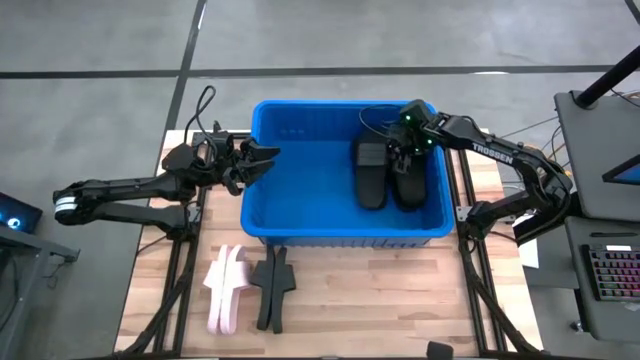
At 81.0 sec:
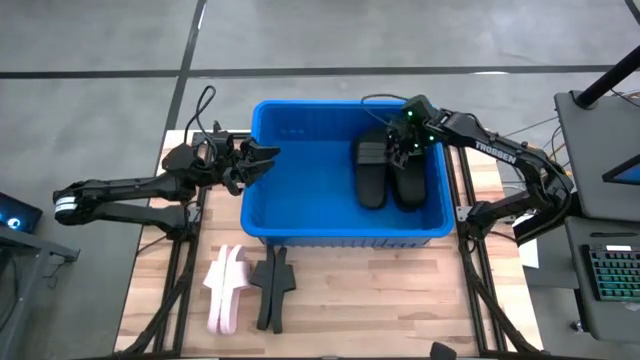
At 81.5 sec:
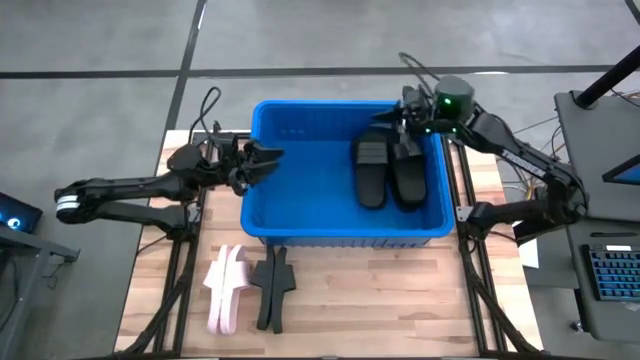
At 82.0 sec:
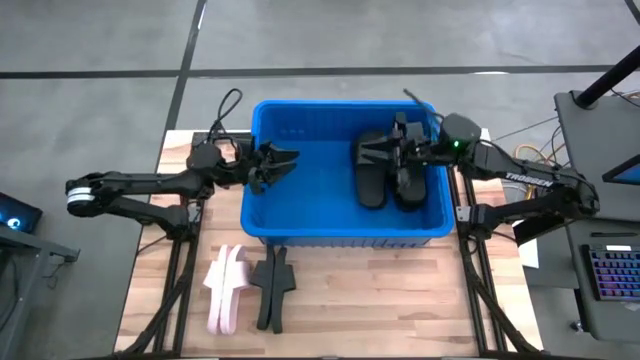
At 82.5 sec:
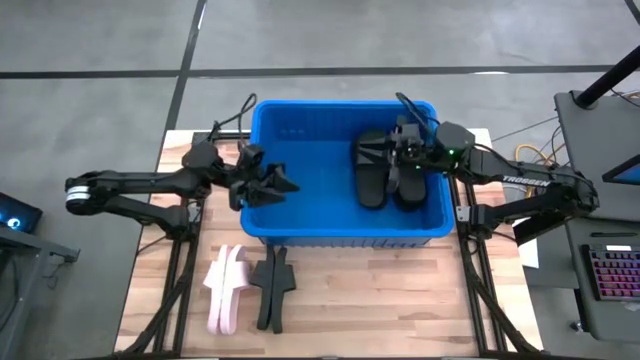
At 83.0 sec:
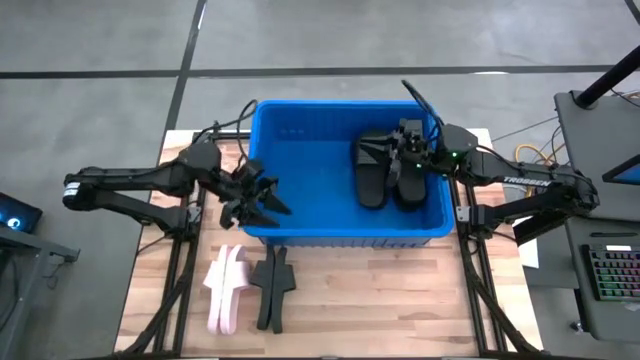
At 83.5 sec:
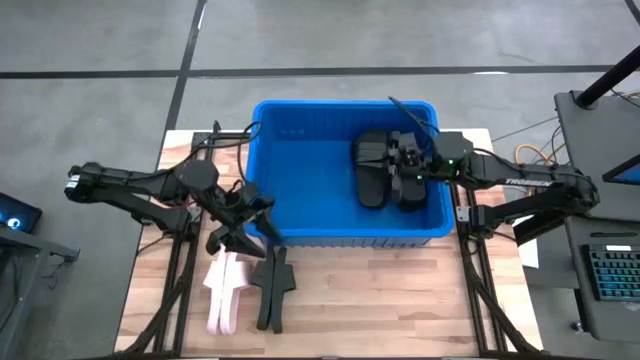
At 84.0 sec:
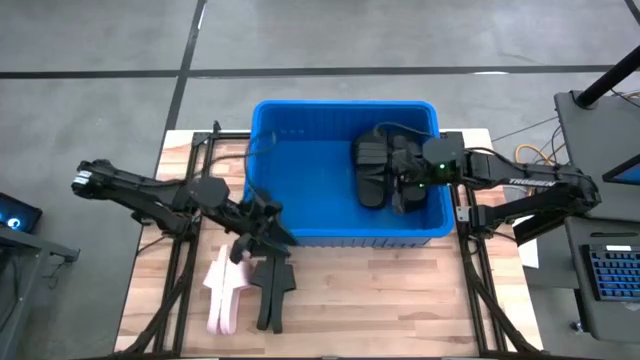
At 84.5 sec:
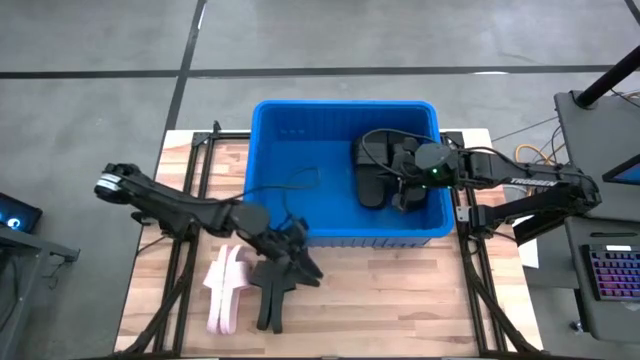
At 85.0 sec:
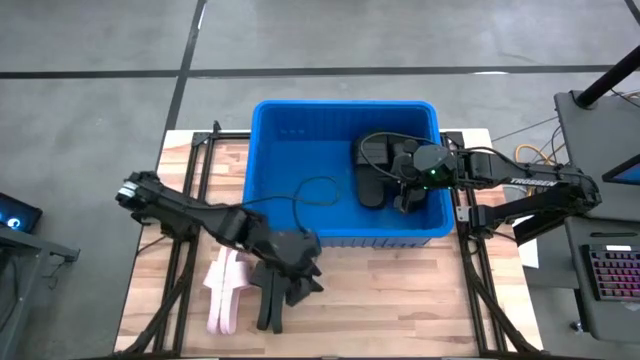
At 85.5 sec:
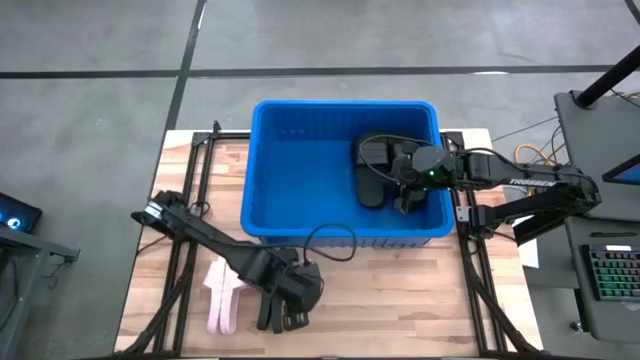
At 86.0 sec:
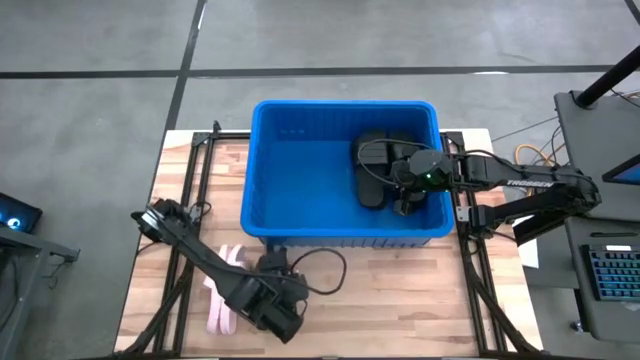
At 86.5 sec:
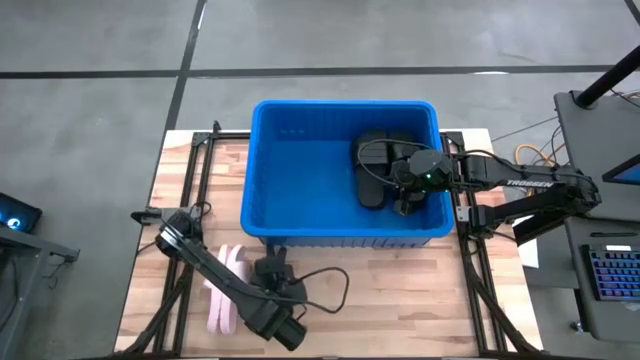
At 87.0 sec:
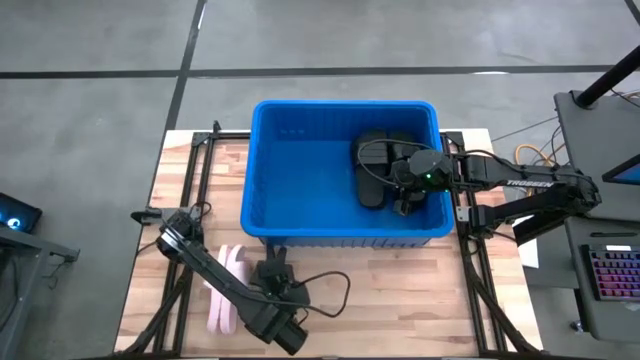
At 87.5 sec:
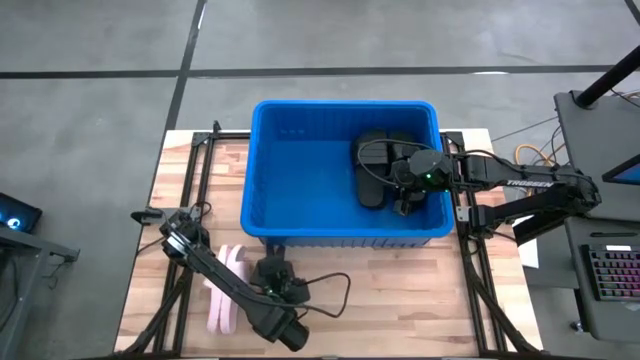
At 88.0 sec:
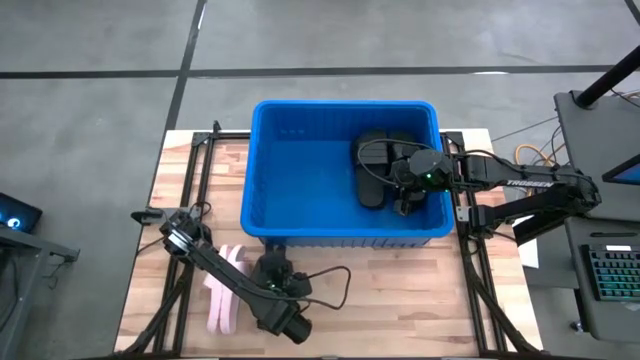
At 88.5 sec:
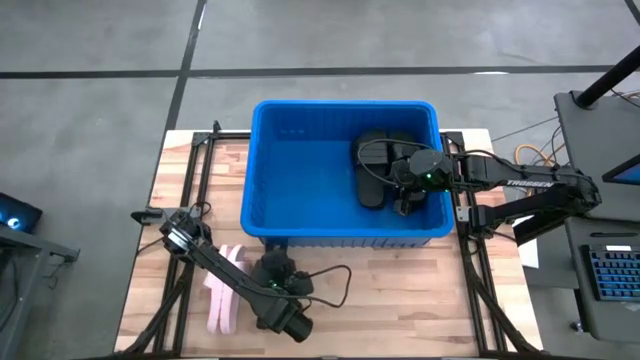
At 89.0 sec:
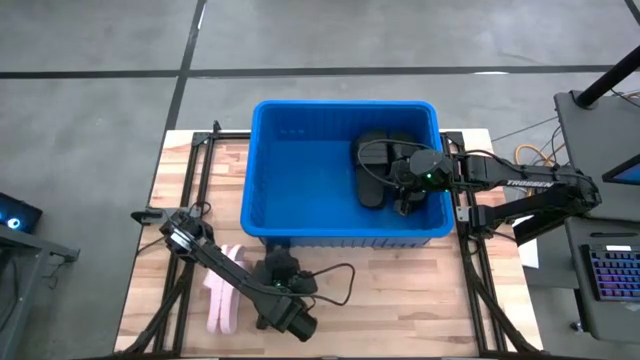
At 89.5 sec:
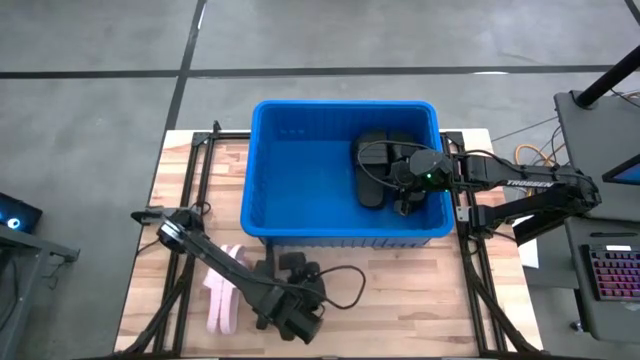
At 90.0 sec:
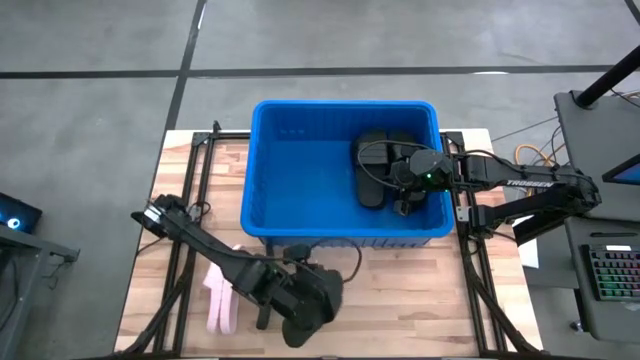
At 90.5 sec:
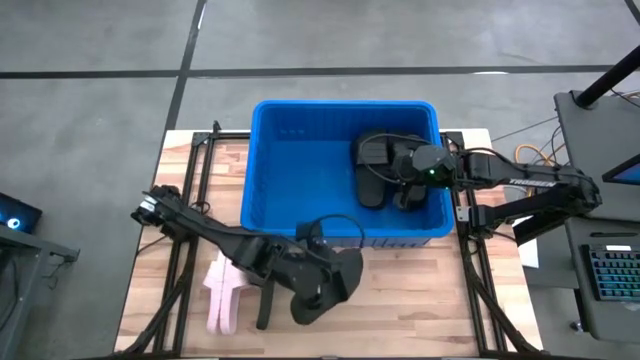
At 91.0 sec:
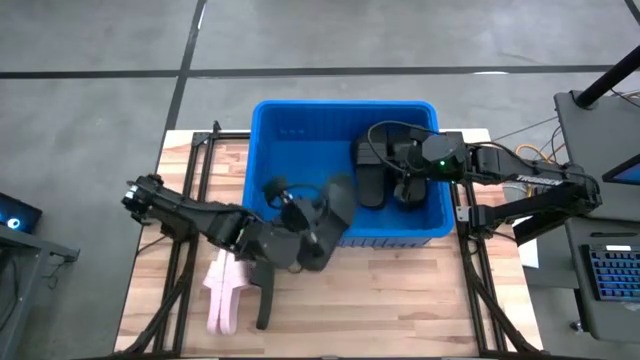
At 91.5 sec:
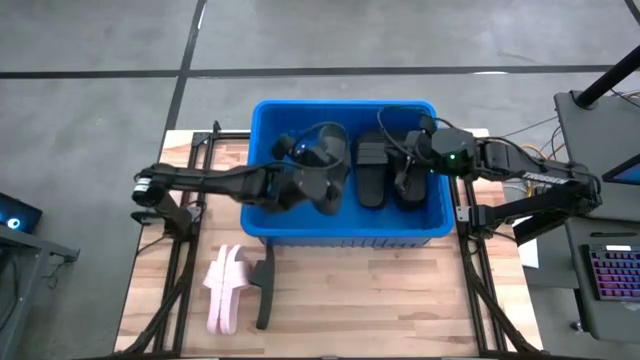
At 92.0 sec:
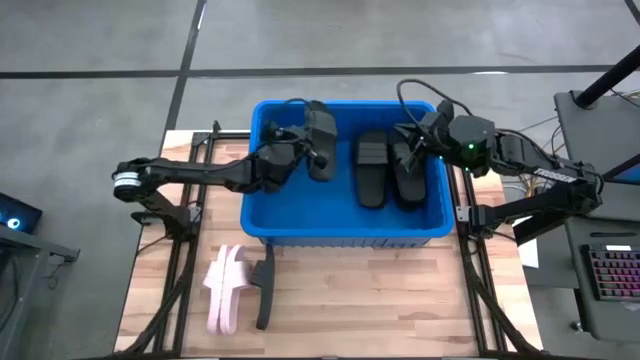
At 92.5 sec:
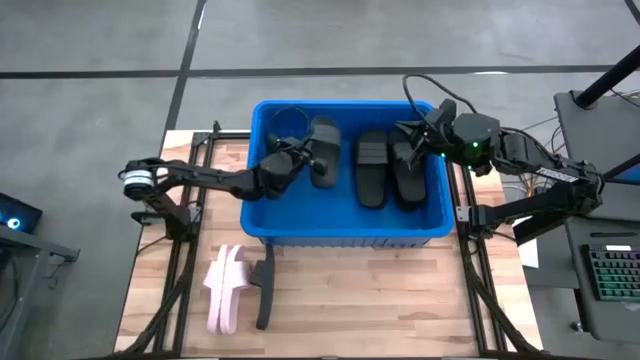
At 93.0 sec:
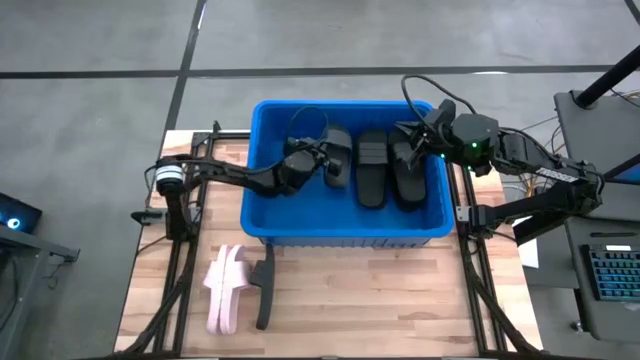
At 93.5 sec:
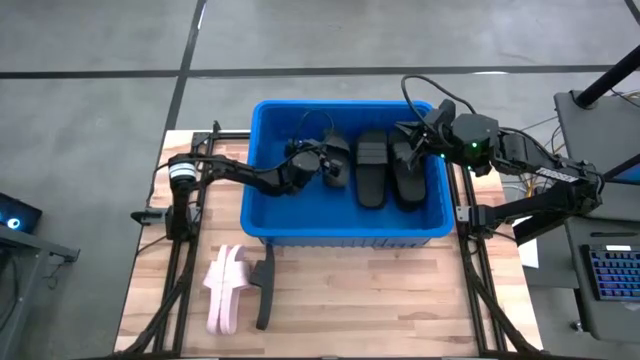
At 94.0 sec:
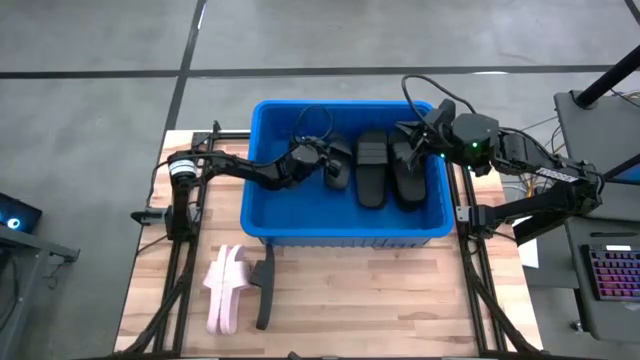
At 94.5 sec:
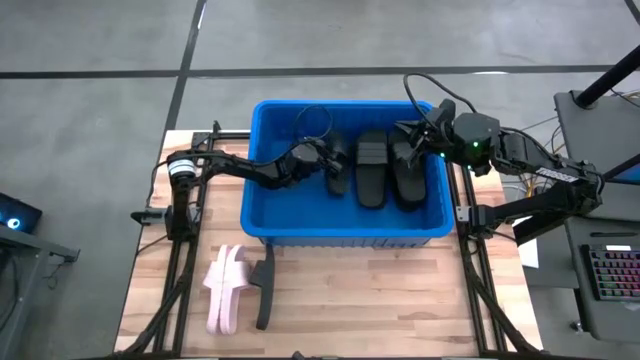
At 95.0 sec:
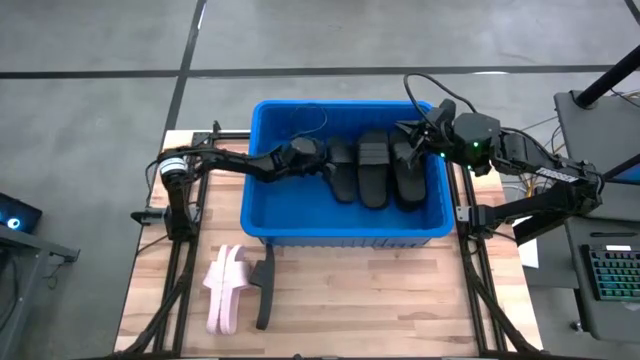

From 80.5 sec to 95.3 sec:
Task: Pick and place slides into bin
Put the right black slide into the bin

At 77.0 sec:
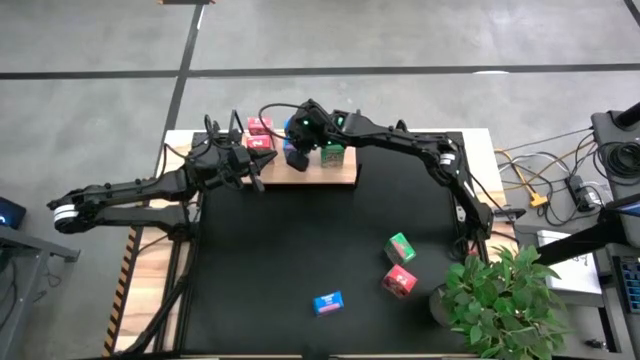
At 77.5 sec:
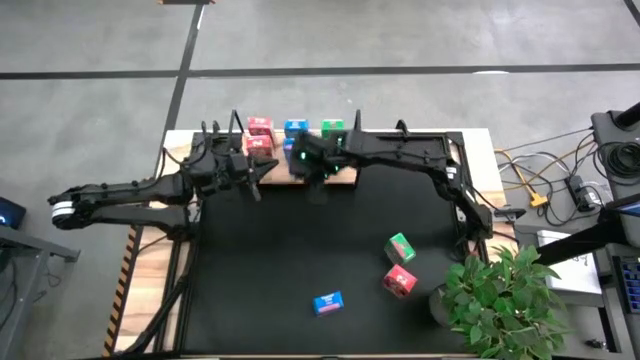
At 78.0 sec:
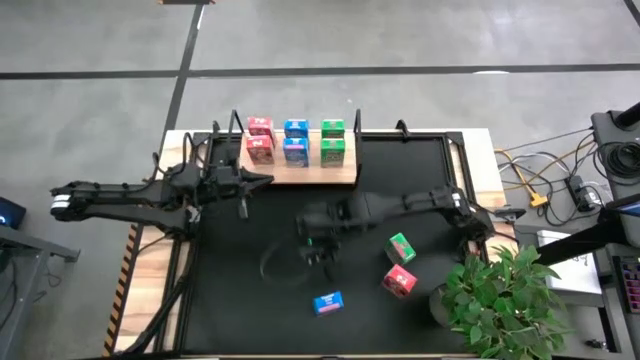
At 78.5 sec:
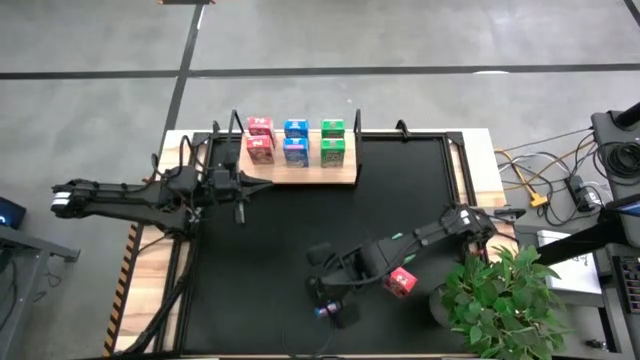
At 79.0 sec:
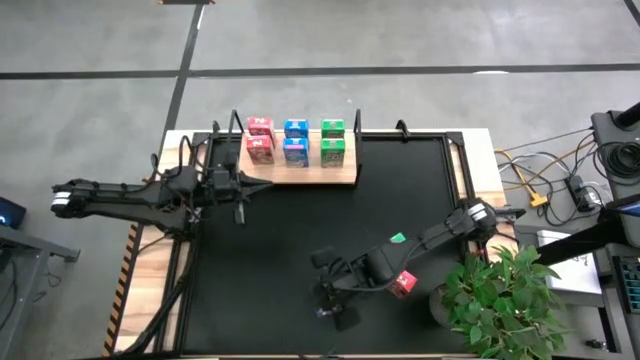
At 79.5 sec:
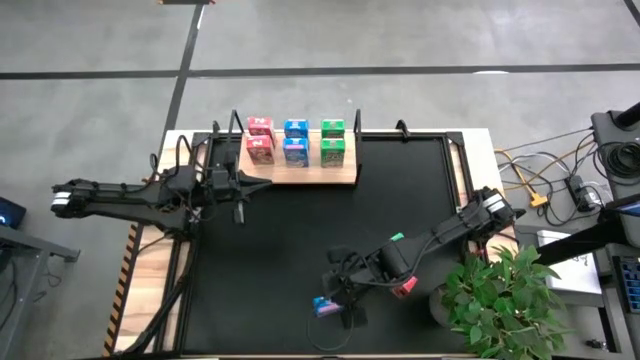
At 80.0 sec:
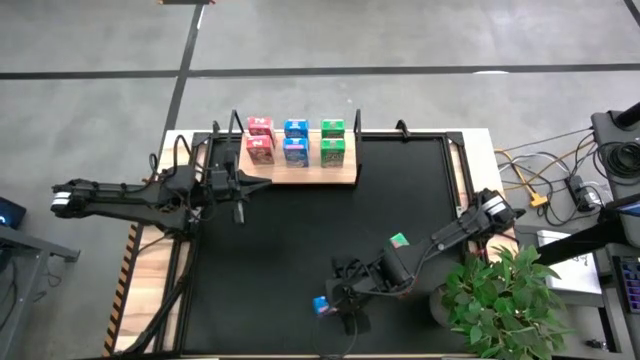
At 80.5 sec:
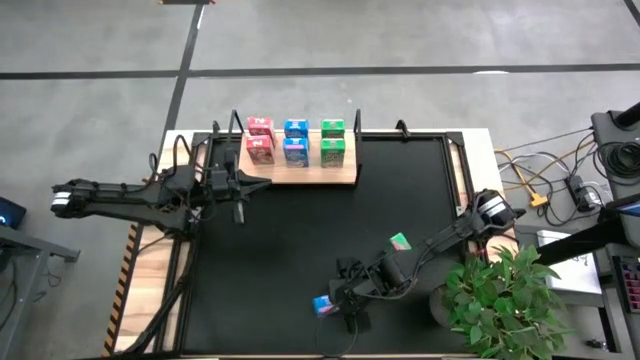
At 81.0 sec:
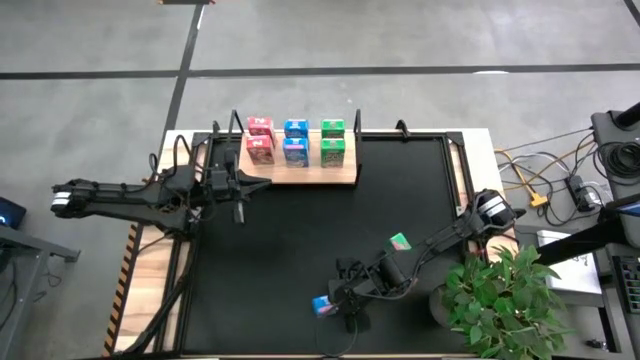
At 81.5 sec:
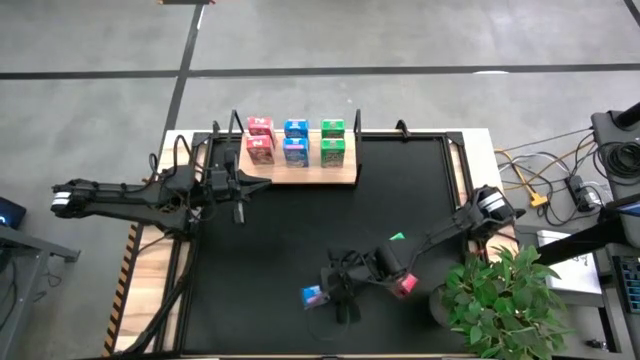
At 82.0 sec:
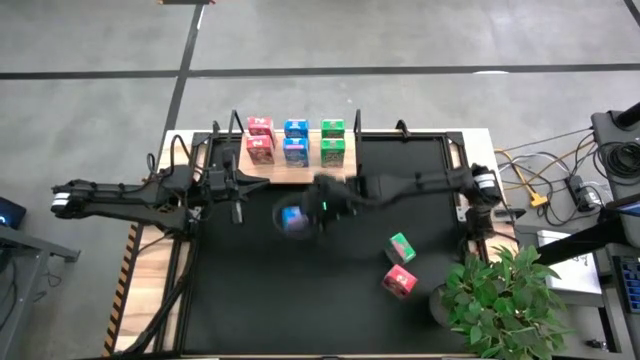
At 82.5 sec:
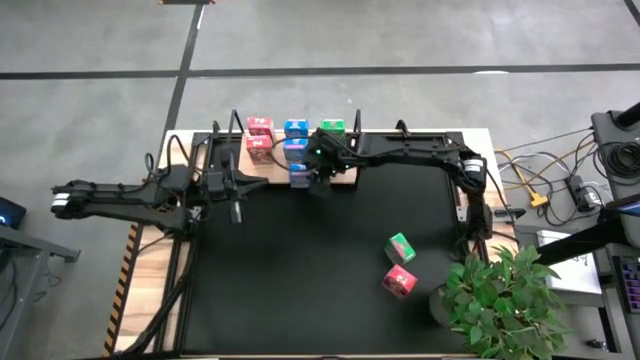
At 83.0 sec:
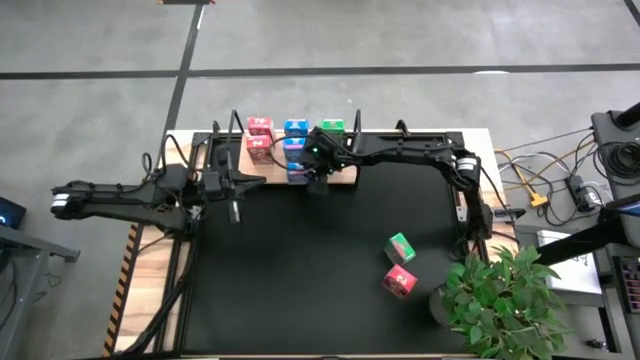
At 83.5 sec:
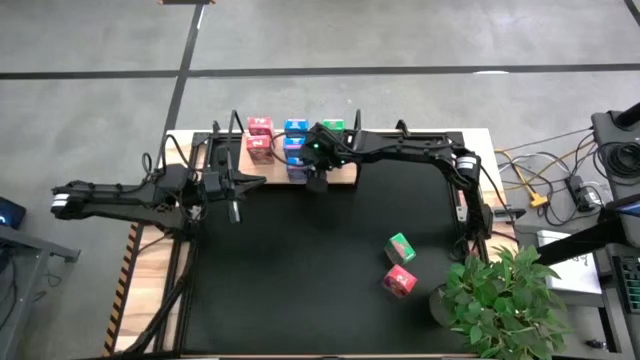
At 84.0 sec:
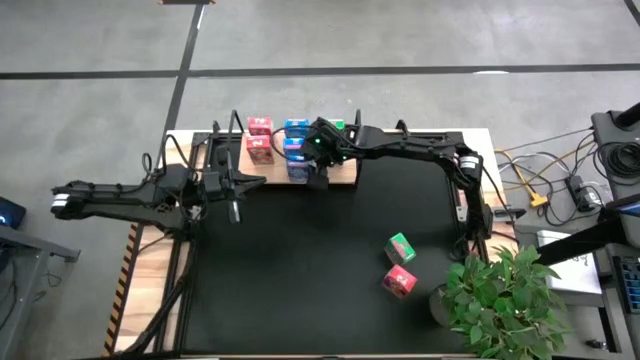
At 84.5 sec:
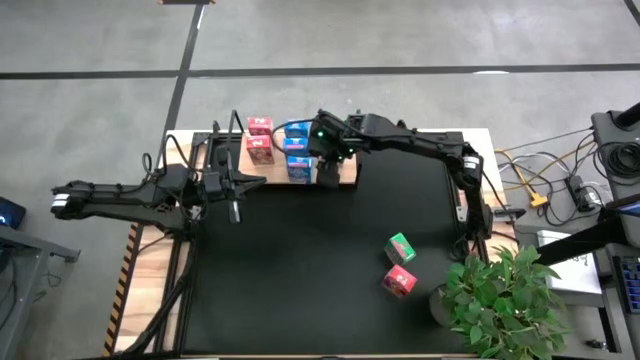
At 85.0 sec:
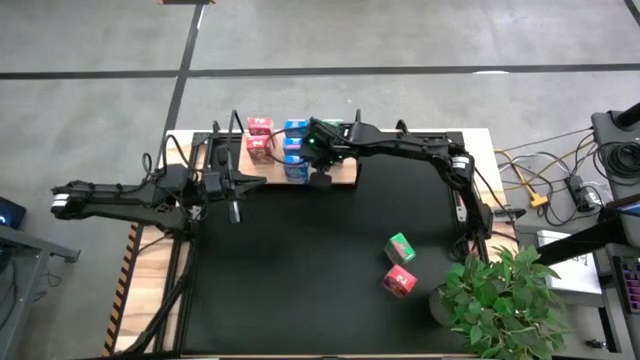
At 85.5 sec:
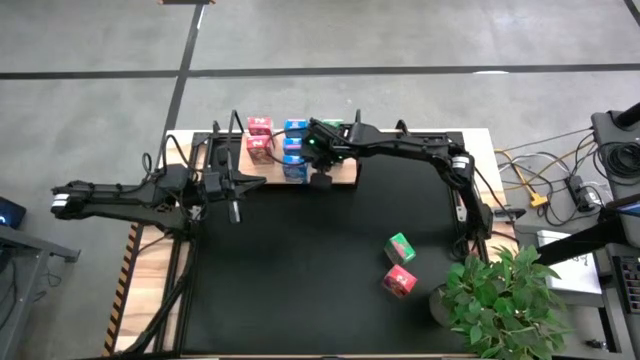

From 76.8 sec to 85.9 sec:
Task: Stack cereal on shelf
Put the blue cereal box on the shelf aligned with the other blue cereal boxes
